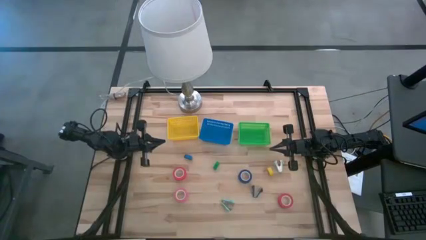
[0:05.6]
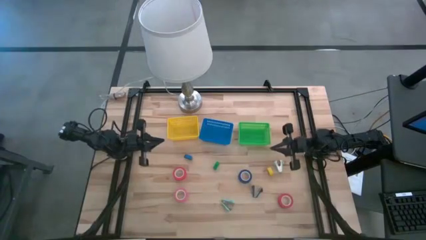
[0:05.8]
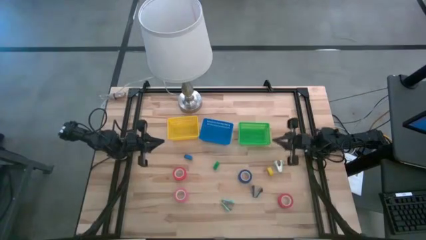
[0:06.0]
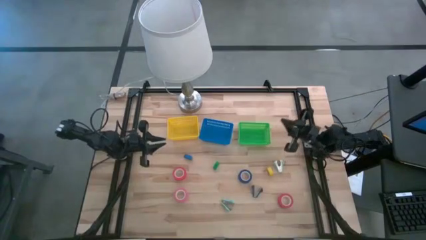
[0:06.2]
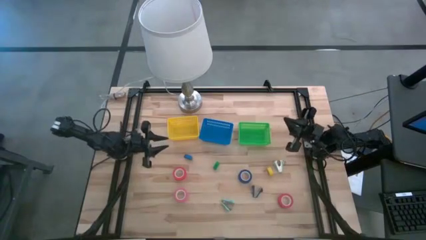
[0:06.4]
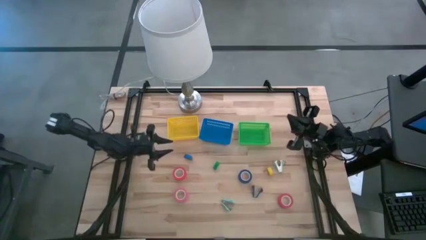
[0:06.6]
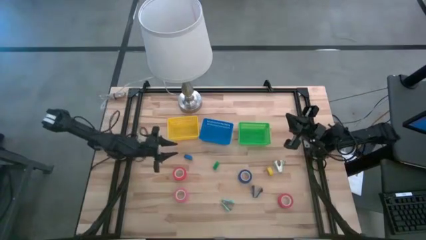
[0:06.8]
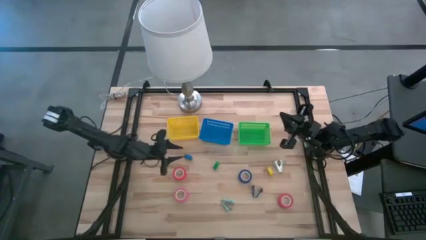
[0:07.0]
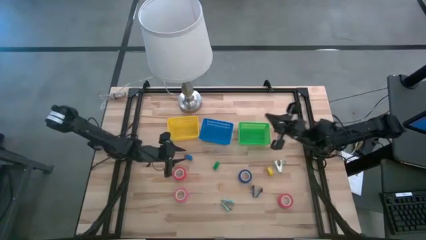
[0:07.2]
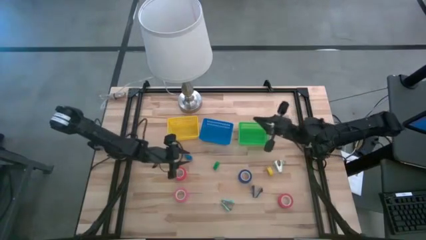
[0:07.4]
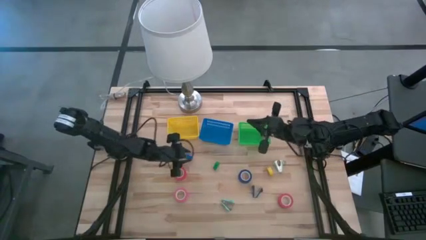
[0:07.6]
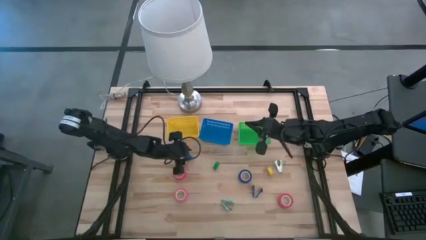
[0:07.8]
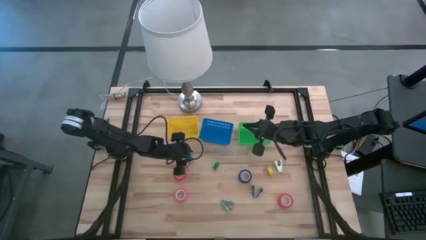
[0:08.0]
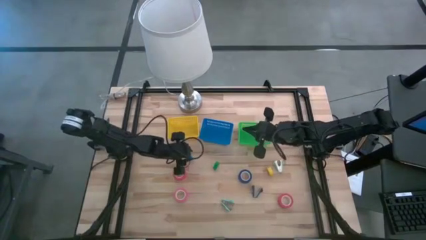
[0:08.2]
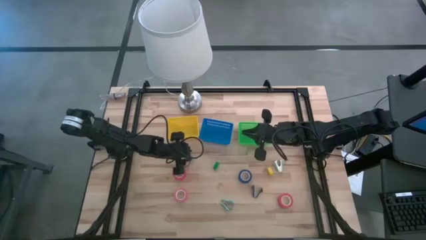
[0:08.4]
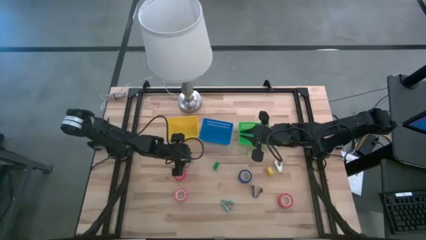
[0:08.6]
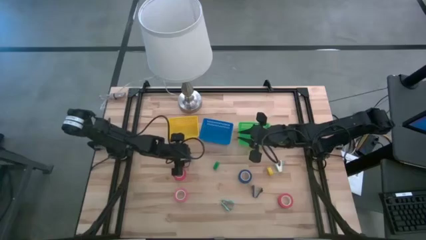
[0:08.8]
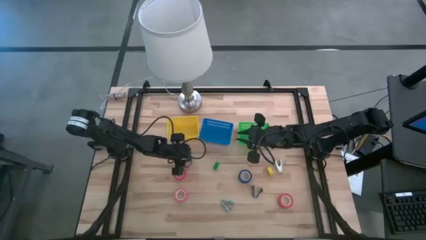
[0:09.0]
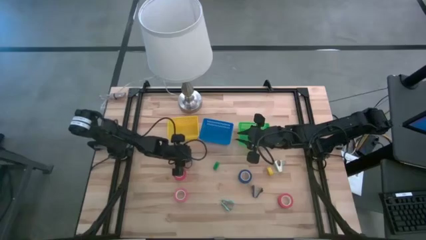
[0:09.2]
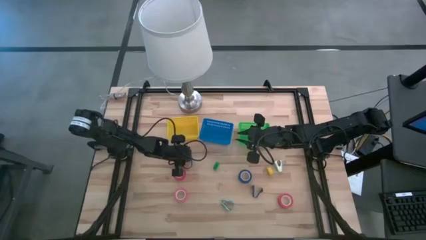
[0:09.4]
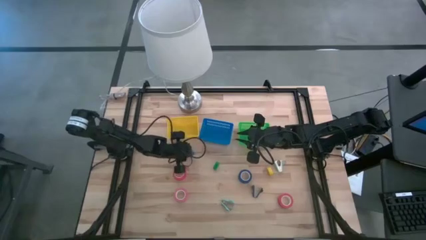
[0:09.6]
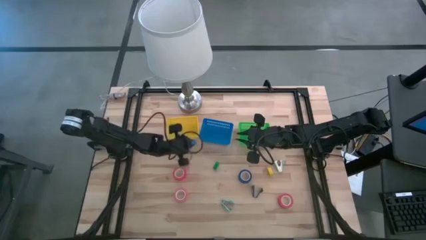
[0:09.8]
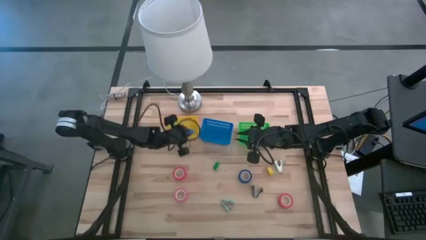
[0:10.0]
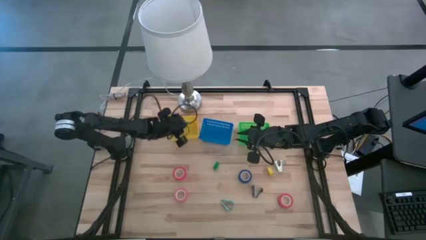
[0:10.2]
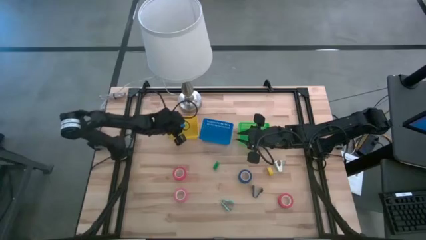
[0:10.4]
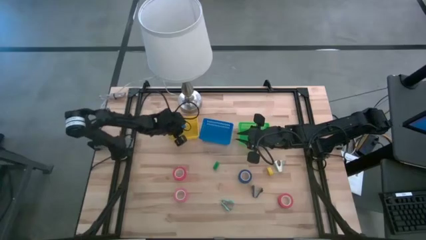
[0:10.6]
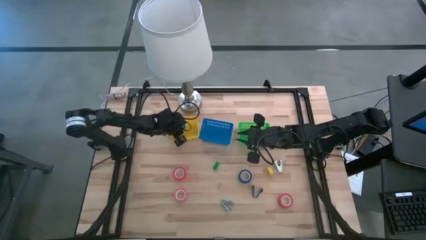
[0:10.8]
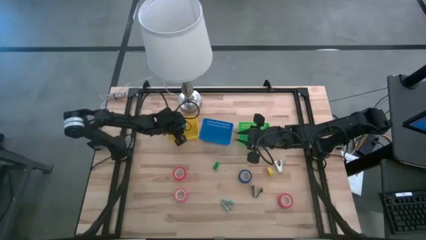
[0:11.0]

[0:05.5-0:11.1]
Task: Pick and place Stapler, Stapler remover, tape
Put the blue stapler into the yellow bin

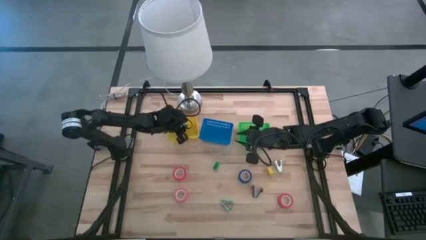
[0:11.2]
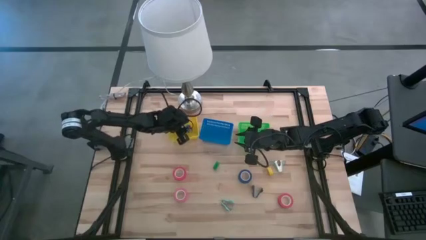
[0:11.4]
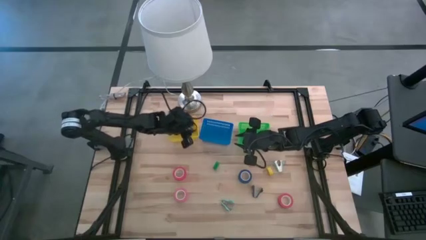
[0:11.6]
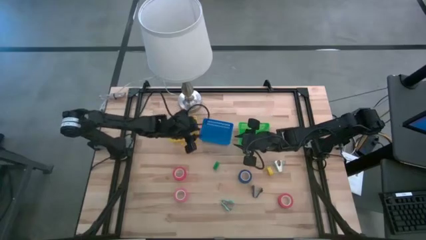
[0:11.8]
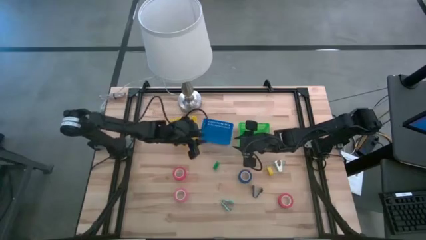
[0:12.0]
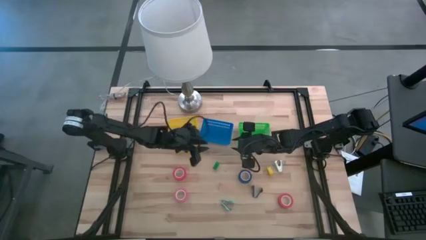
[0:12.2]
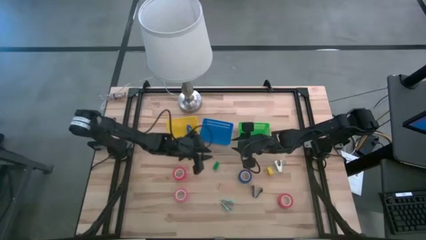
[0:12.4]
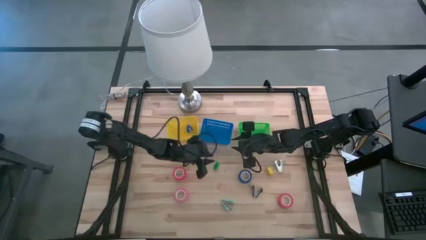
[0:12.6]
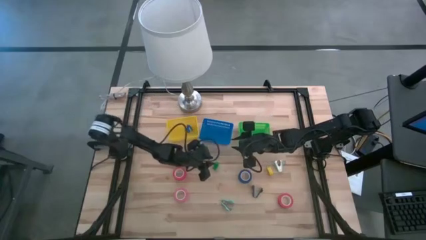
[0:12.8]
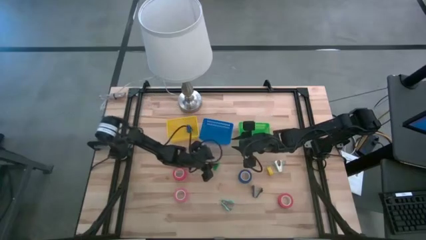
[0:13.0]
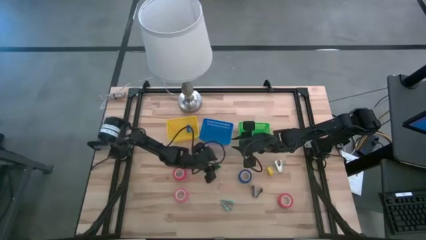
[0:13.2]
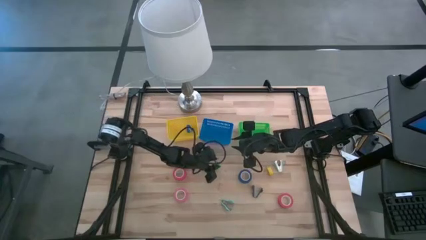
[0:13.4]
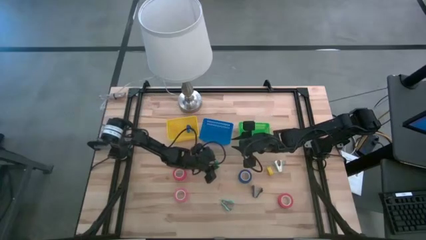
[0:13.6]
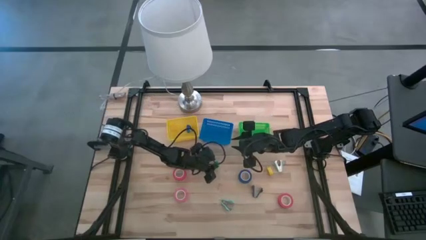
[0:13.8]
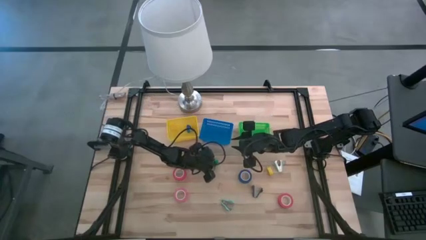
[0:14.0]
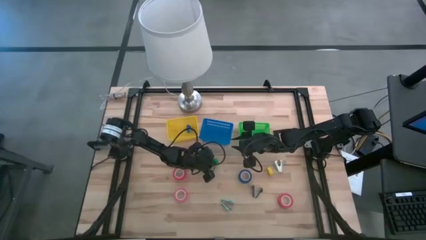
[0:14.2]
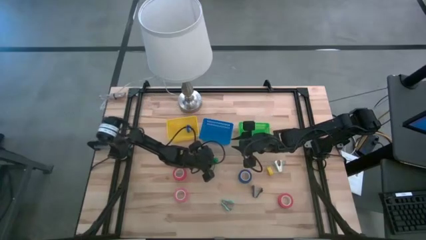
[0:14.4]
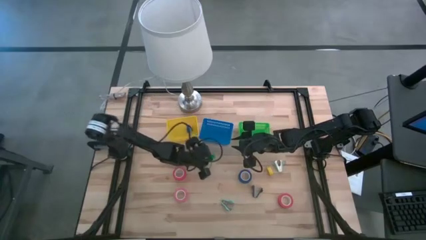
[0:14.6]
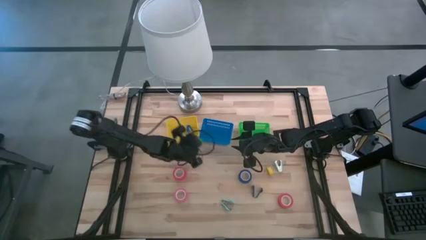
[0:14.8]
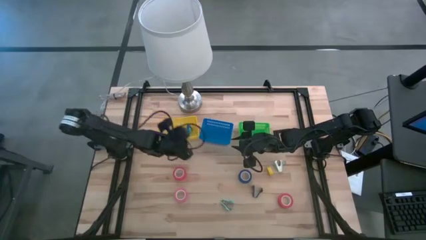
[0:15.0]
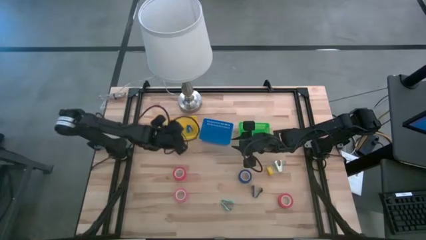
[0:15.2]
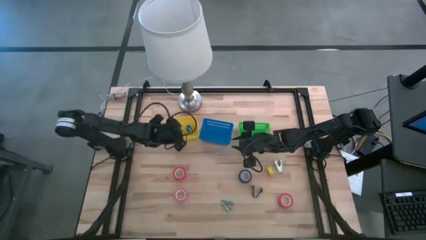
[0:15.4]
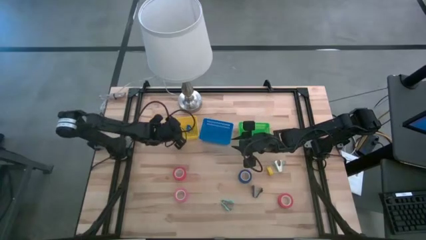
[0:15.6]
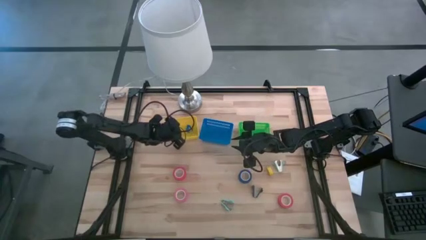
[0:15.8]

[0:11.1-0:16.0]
Put the green stapler into the yellow bin

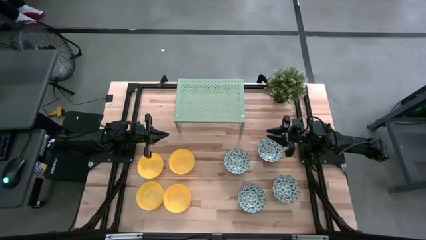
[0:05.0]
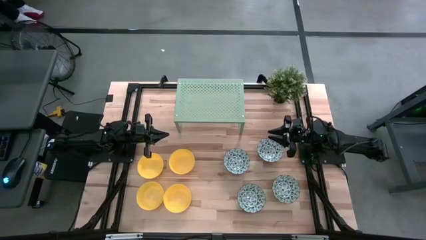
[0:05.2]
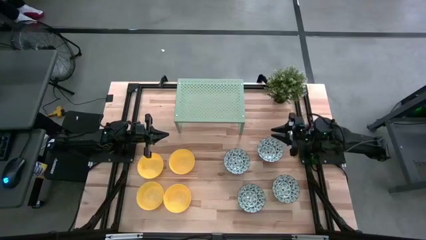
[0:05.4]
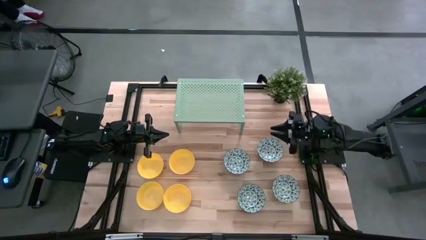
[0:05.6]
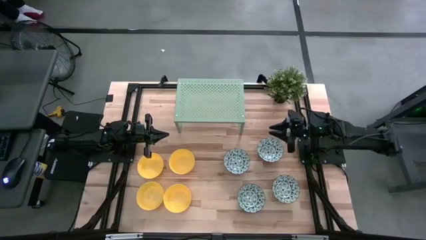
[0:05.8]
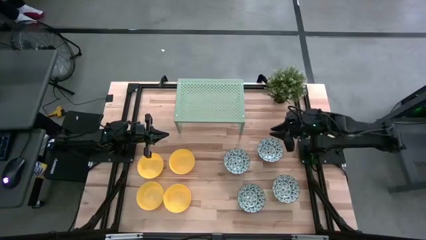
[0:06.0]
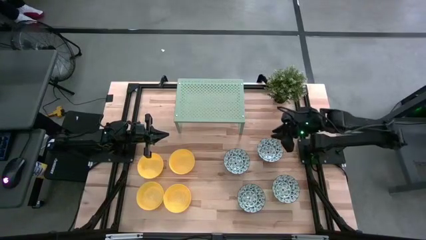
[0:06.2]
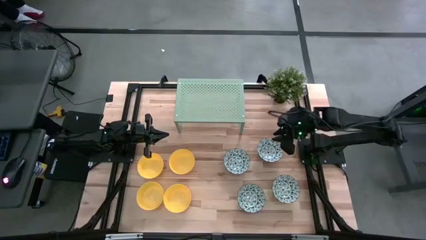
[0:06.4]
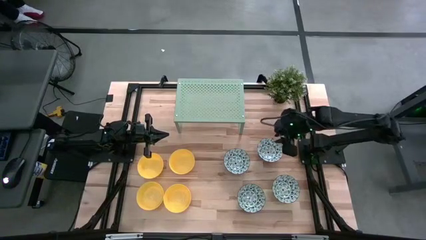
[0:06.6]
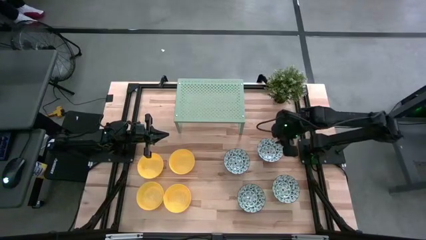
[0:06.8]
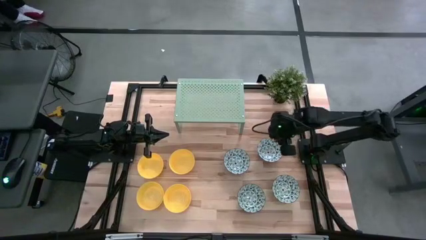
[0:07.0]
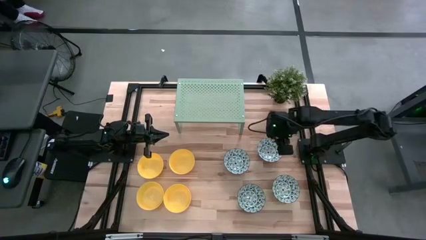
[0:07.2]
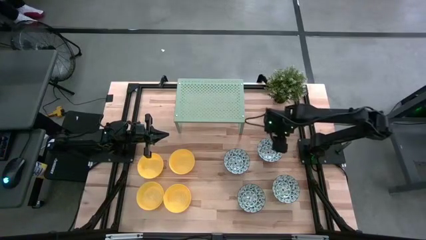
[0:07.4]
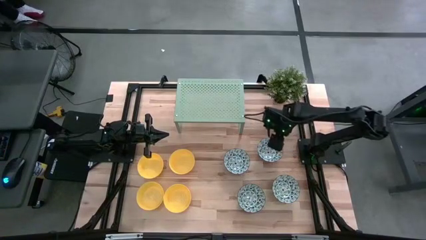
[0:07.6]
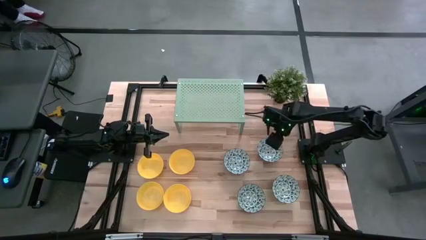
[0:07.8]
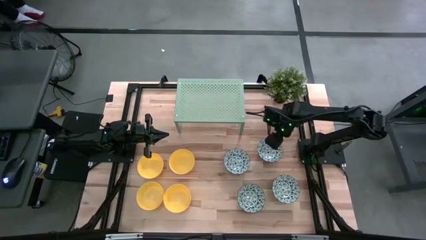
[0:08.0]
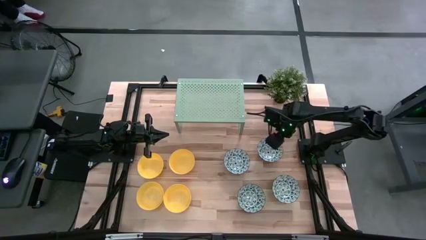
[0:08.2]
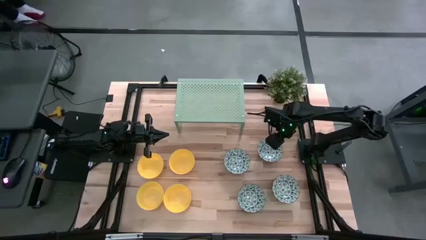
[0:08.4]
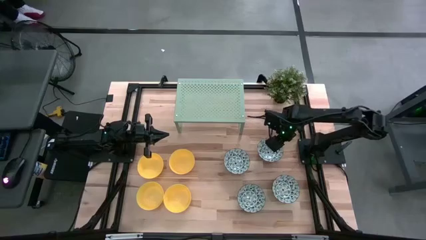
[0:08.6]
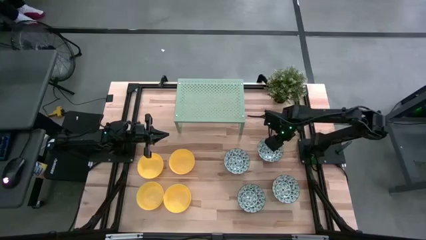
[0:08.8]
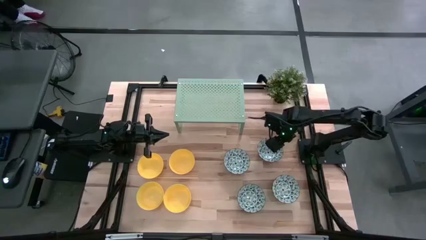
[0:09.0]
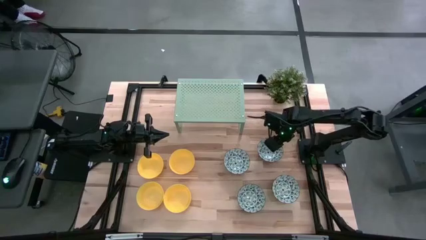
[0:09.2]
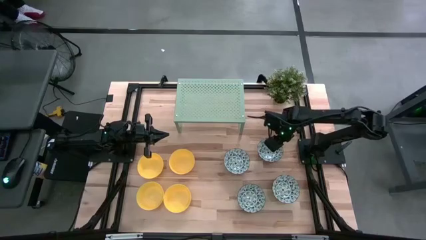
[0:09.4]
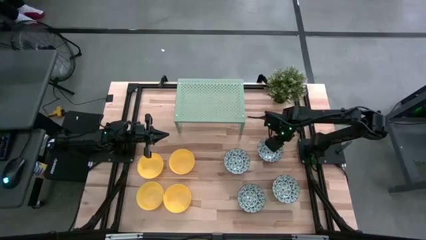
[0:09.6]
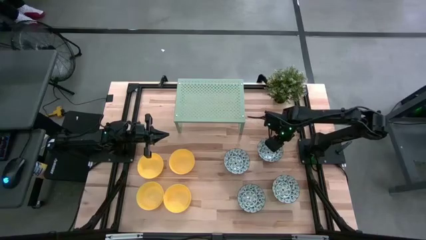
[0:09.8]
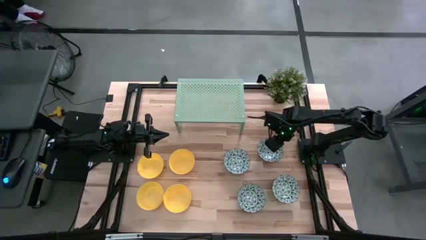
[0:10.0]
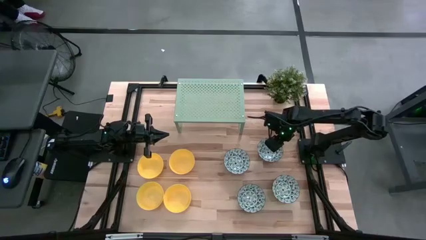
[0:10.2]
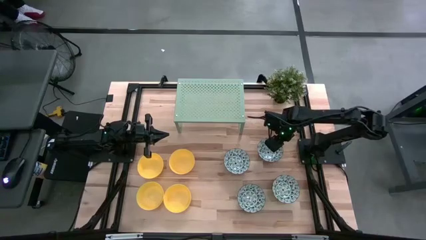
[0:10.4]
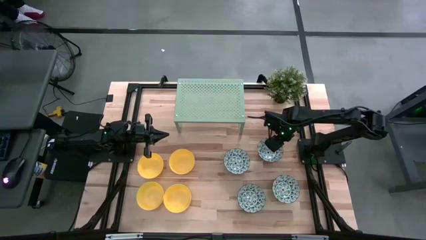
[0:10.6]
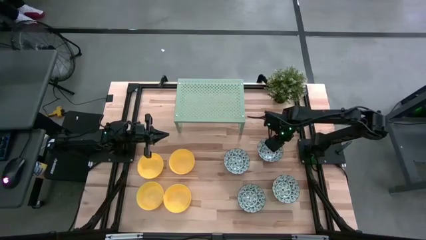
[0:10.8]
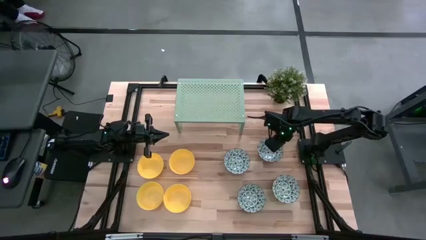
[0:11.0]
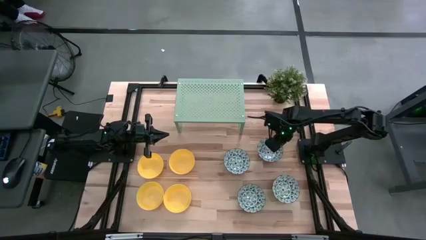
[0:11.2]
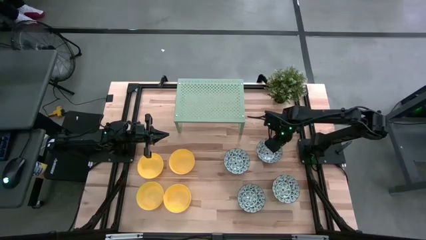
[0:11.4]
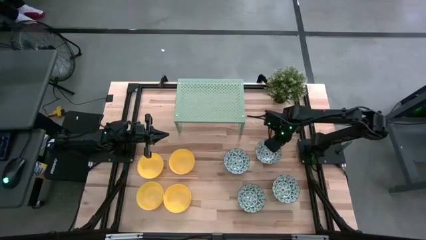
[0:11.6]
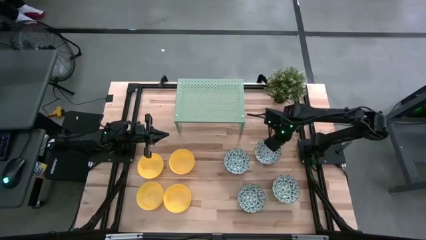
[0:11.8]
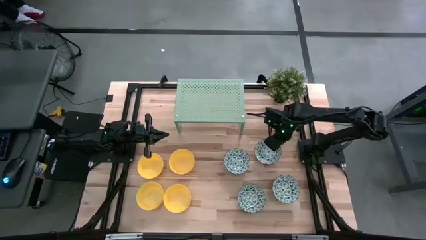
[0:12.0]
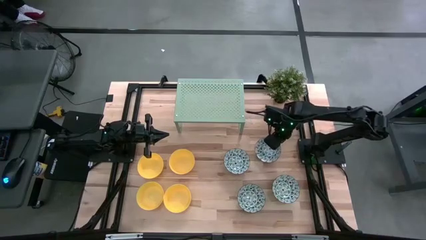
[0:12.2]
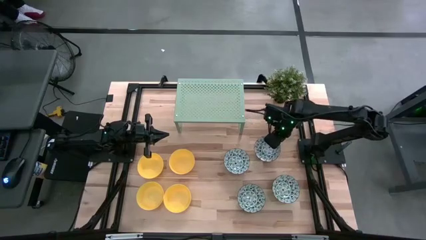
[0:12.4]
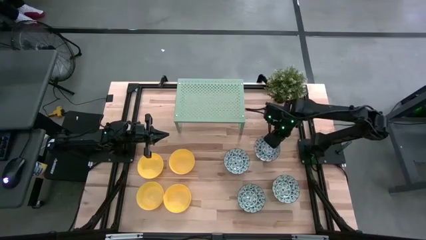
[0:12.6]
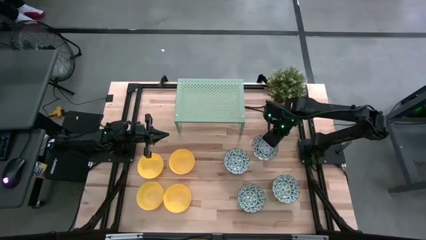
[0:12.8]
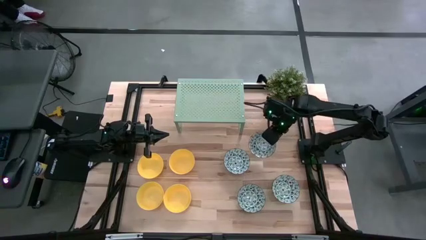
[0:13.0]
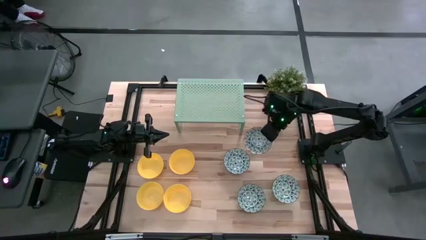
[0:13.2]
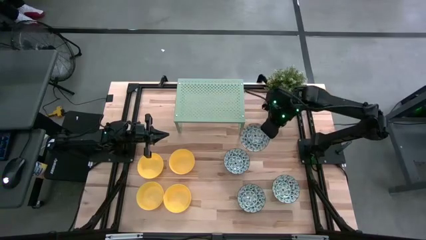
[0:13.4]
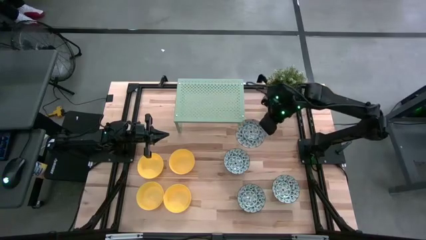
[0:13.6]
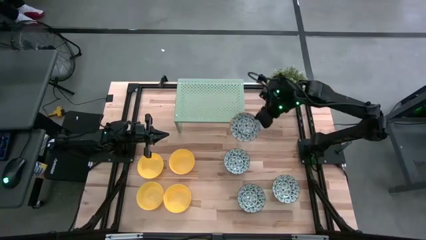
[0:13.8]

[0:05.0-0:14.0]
Task: Pick & Place Mini bowls
Put the blue patterned bowl on the shelf
